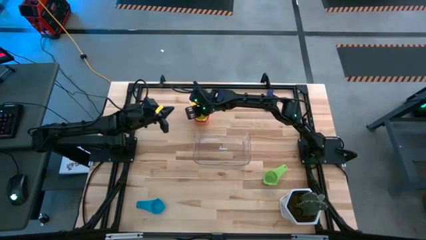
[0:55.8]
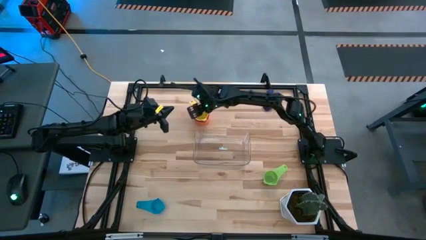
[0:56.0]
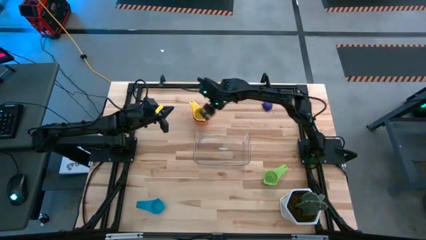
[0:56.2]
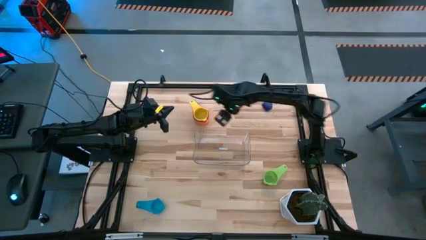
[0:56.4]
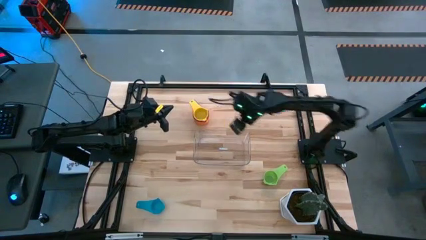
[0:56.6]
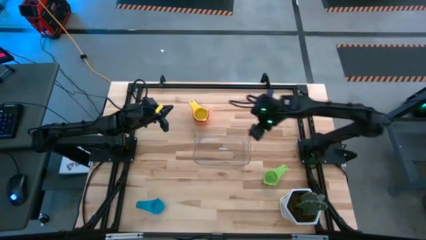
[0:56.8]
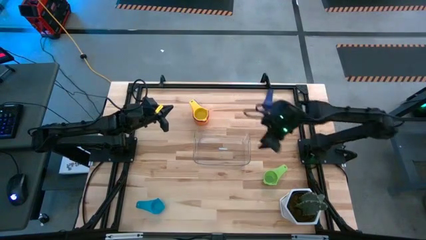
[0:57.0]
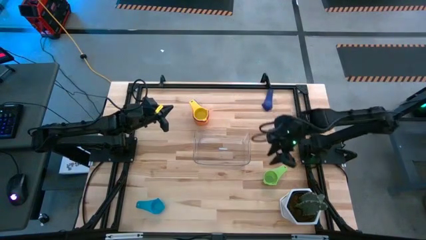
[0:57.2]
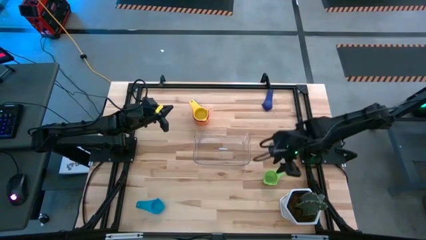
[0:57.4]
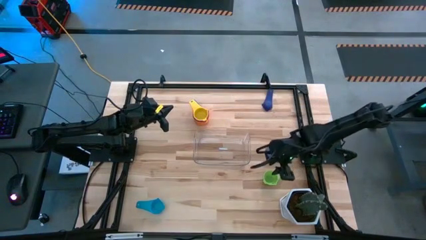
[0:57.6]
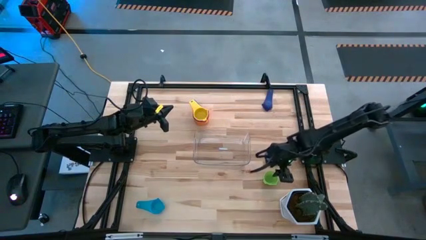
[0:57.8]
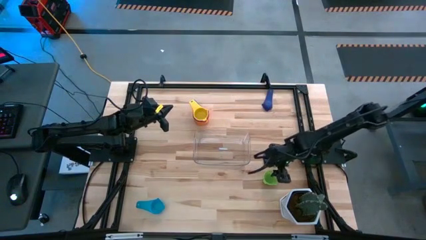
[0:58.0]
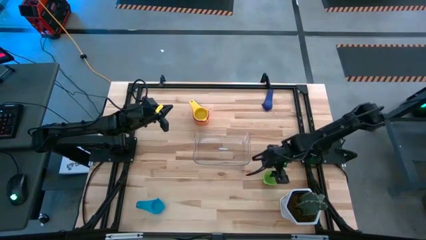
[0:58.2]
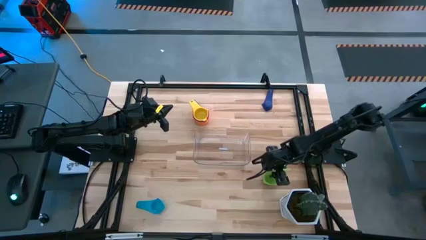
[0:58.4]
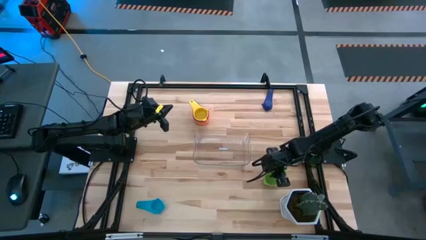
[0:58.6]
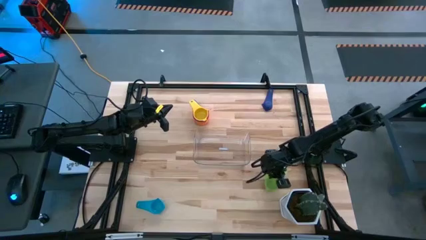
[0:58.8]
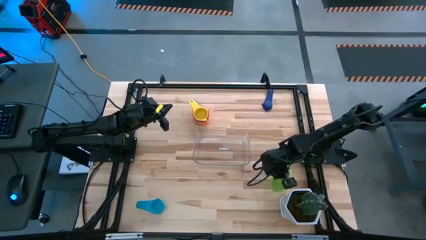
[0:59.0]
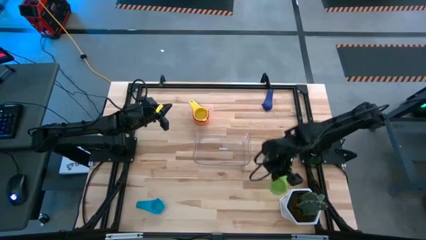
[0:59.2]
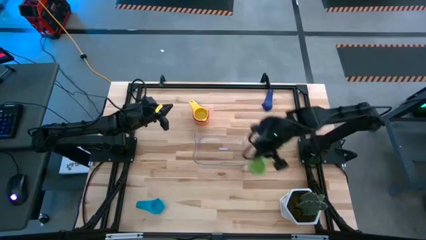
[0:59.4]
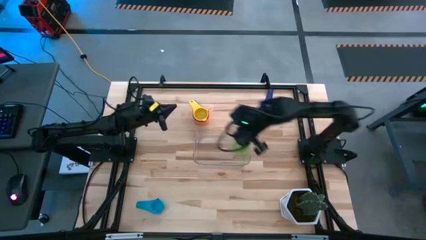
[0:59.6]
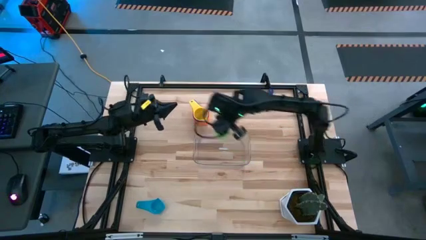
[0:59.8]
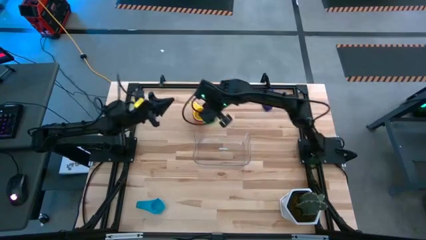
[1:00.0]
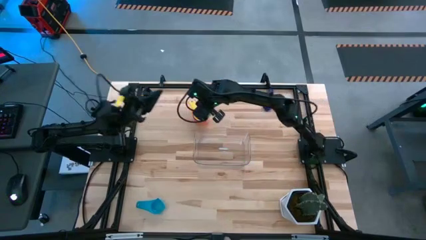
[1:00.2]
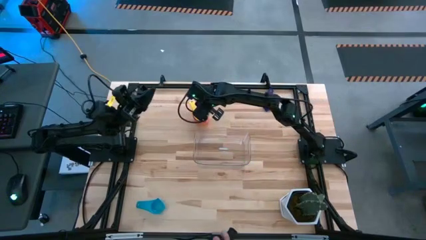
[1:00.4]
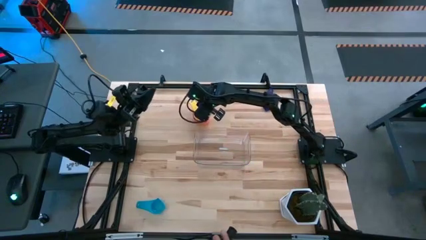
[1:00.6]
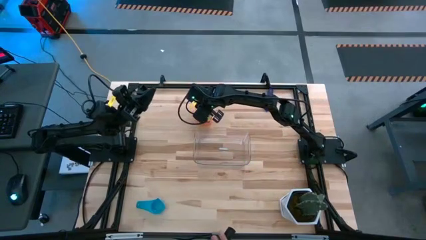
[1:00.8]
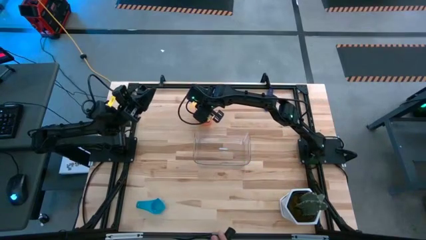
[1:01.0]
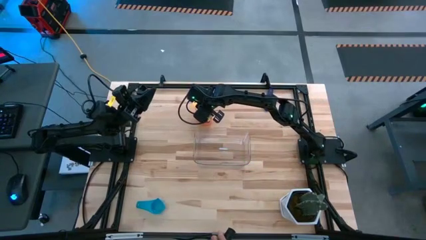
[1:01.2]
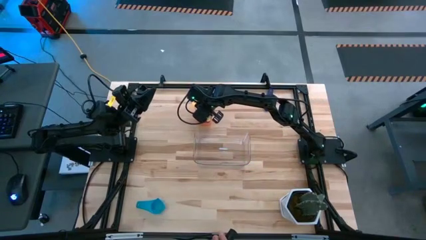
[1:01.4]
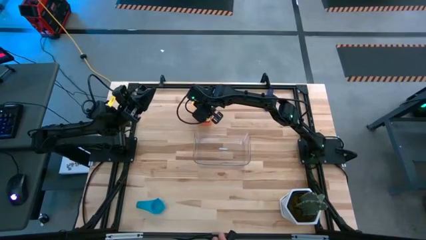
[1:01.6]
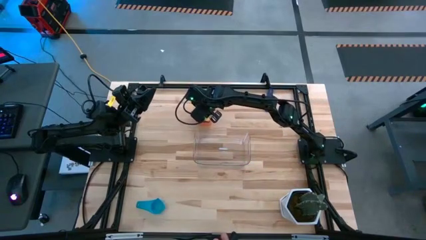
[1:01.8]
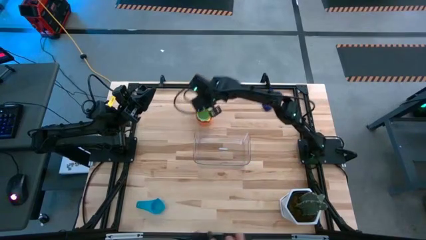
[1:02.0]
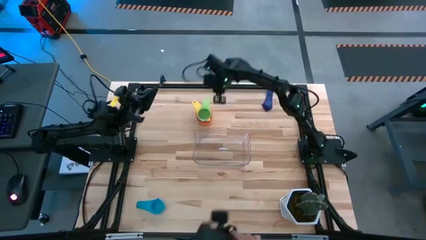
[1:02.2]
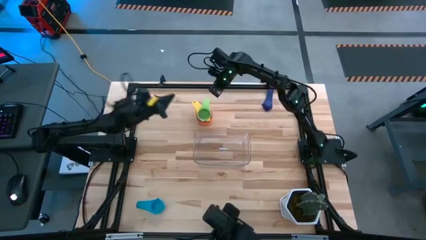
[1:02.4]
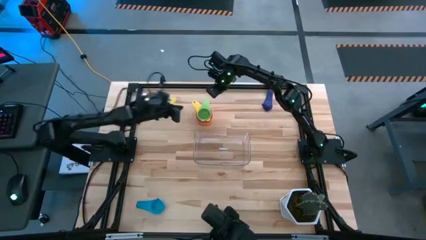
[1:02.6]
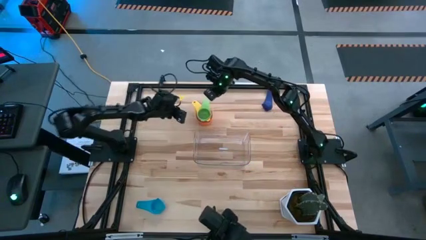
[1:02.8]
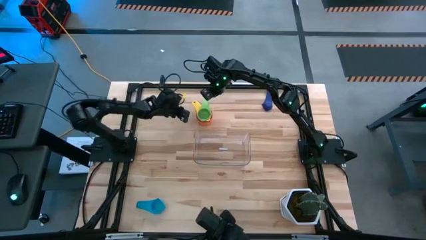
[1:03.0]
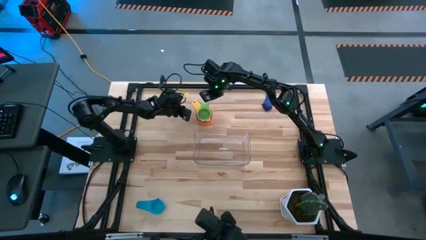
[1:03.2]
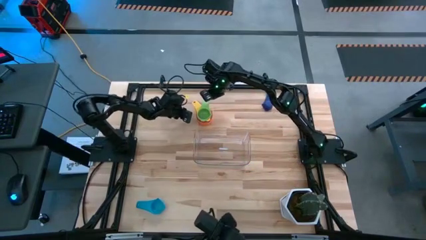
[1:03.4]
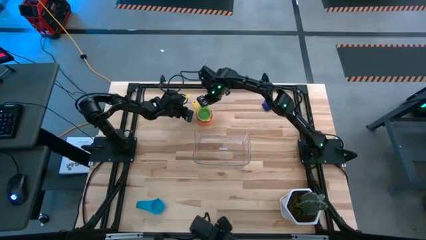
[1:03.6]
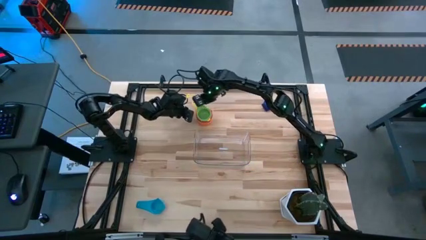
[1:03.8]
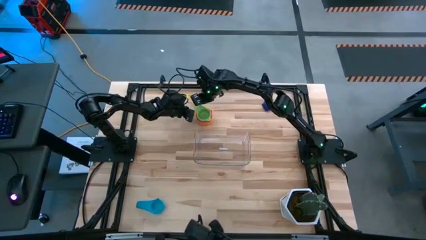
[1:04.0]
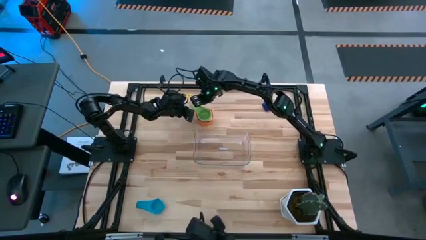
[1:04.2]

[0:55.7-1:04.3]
Task: Nest measuring cups in basket
Stack the green measuring cup on top of the yellow measuring cup

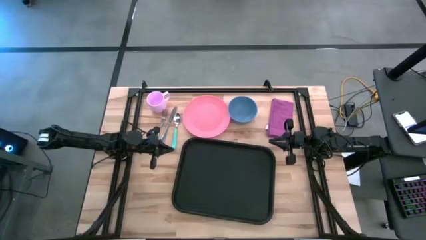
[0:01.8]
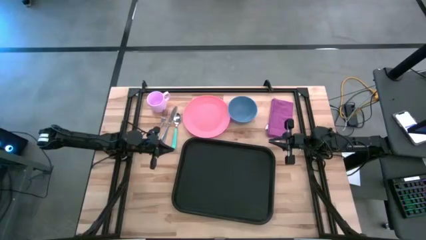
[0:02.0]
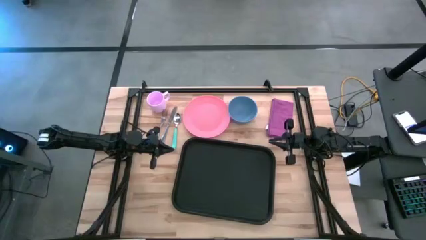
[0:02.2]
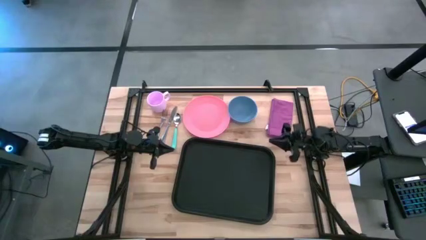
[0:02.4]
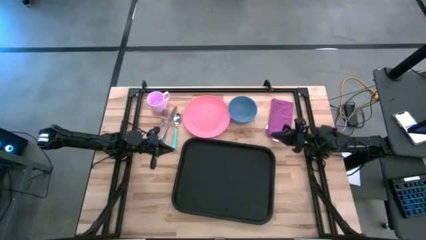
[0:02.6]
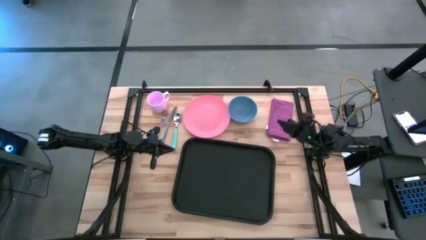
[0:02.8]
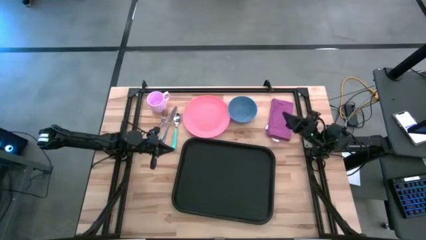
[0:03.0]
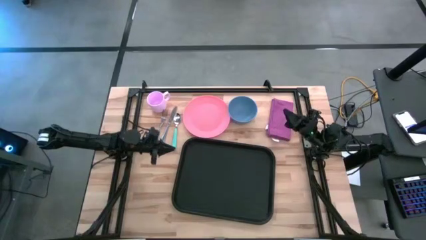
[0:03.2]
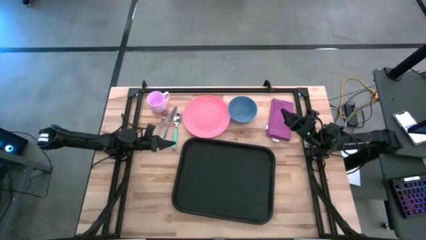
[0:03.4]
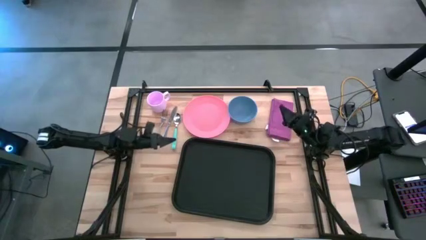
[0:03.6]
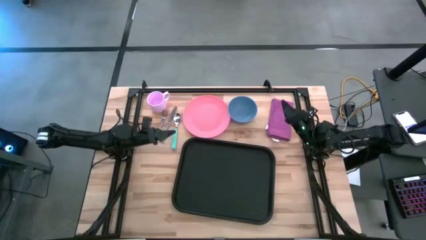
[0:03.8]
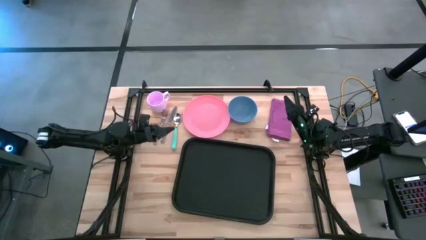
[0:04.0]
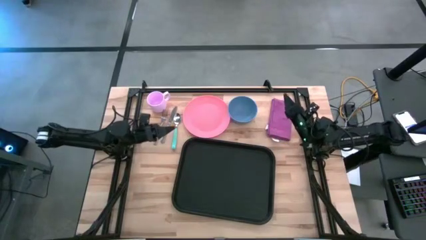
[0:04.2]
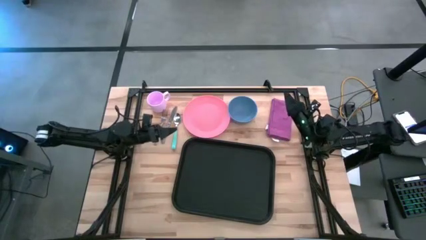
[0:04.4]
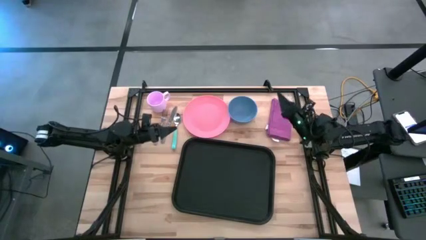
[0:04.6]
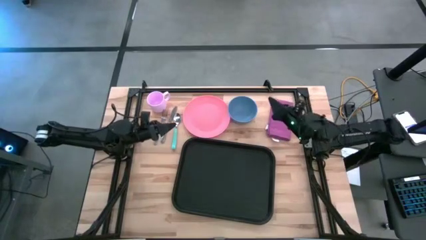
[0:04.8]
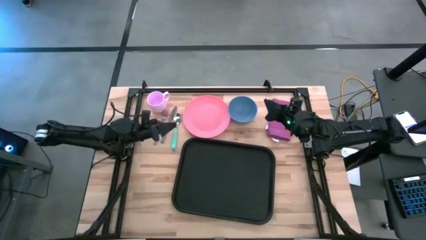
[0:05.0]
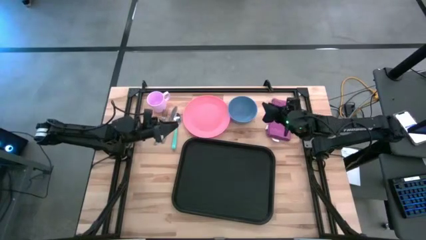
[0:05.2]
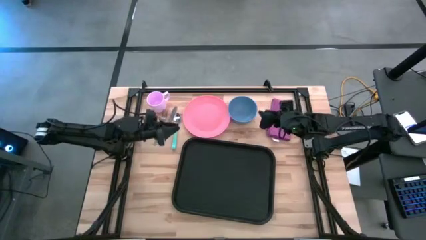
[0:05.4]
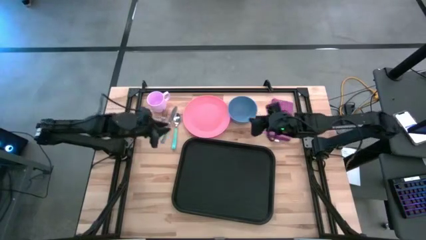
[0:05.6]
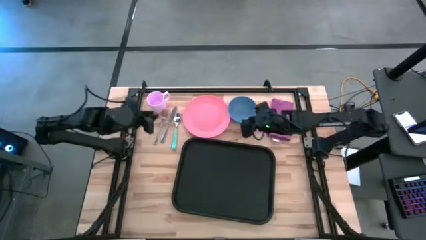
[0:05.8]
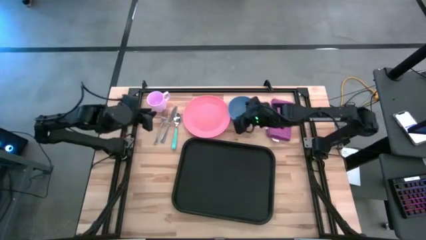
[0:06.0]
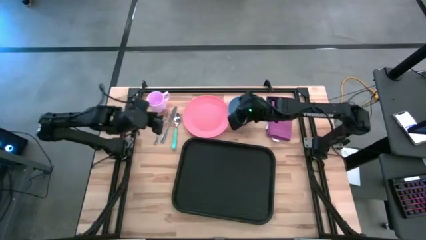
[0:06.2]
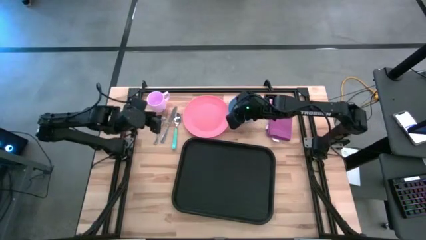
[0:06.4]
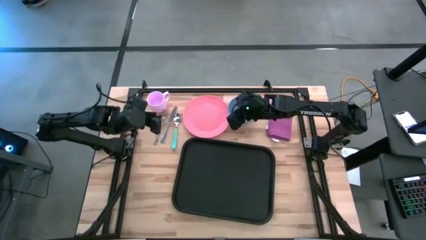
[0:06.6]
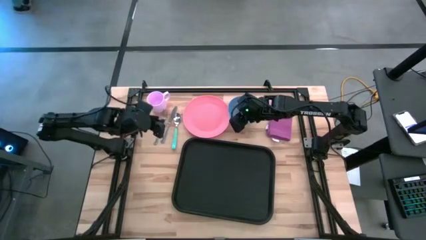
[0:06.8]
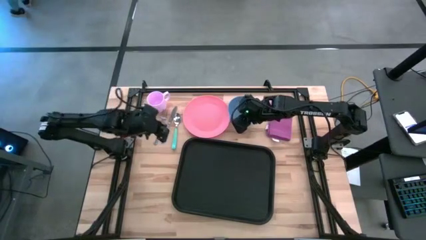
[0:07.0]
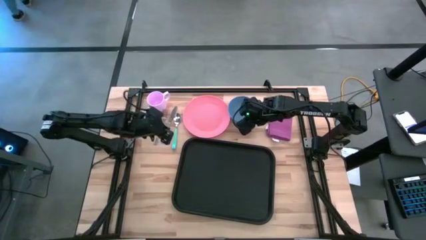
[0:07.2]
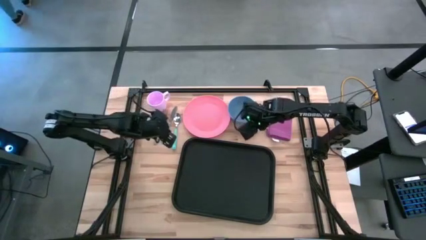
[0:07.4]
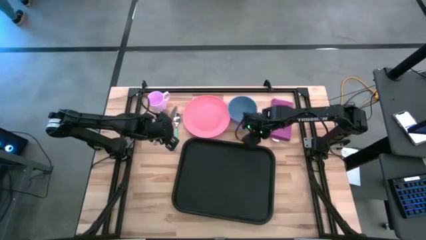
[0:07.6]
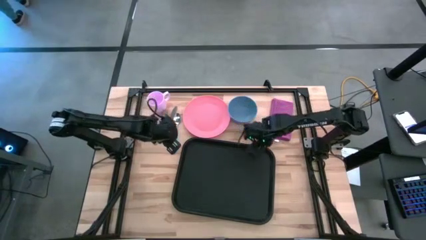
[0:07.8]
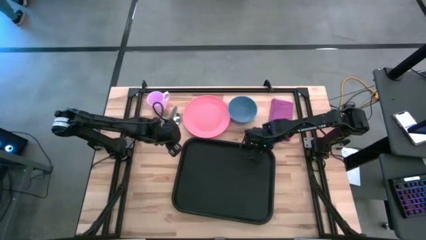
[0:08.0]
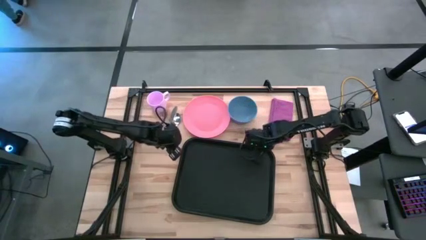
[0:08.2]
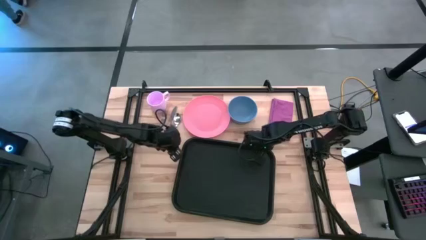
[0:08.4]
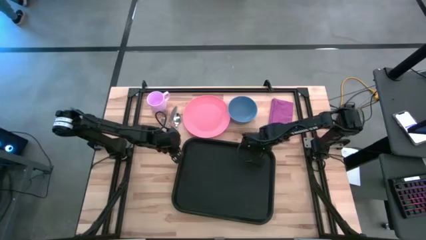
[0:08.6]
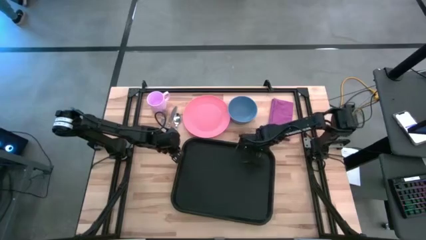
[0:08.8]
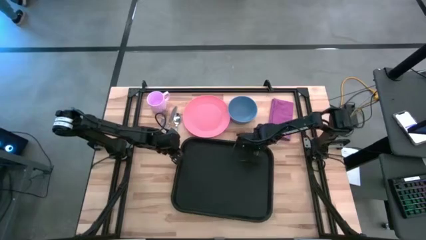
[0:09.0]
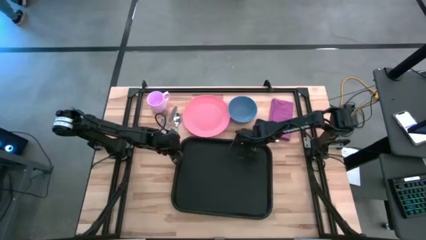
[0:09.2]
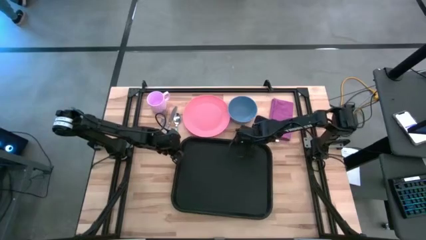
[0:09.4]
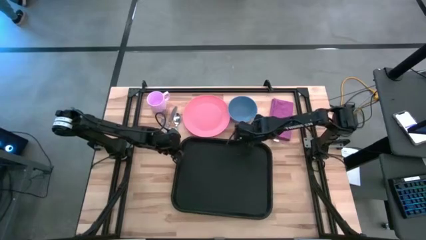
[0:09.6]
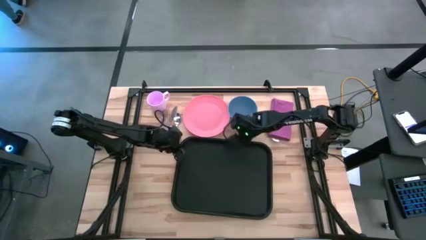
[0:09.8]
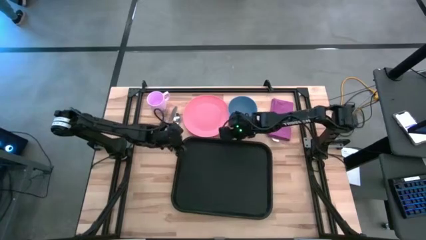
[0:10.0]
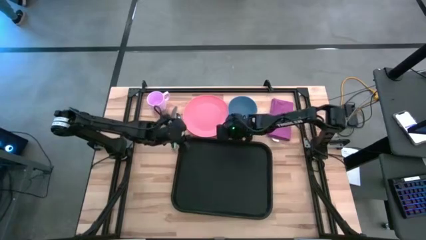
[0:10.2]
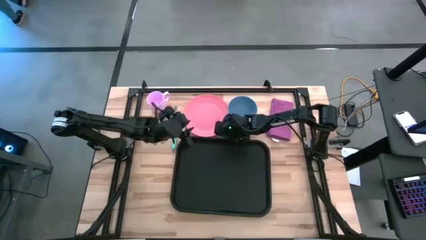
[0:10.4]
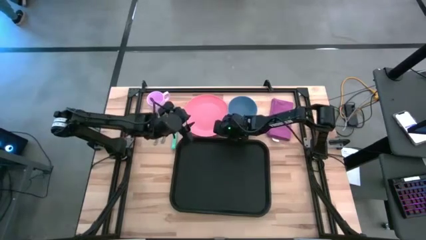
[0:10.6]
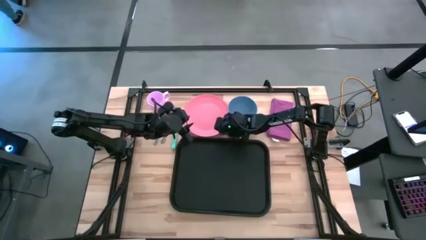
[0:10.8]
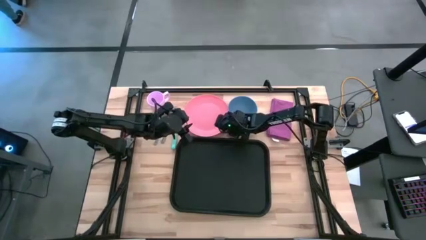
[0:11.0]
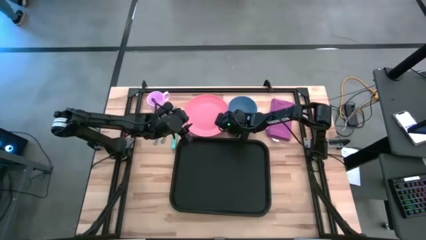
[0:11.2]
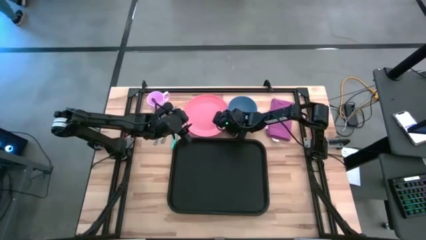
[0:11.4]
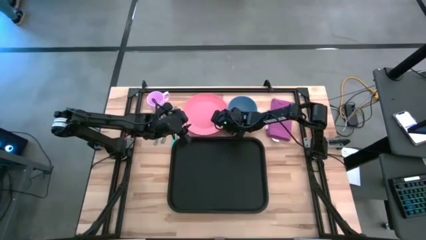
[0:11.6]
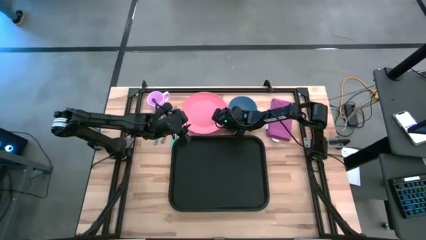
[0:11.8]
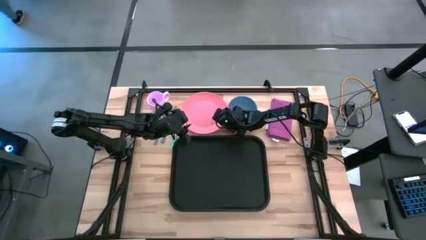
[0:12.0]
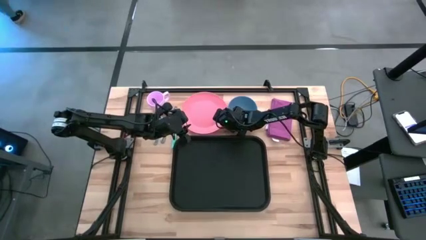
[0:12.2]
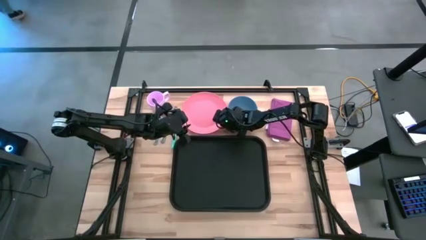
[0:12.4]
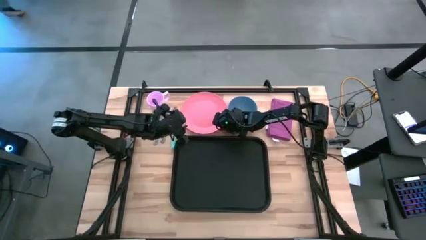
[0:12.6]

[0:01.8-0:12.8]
Task: Set up tray
Put the pink plate on the black tray
